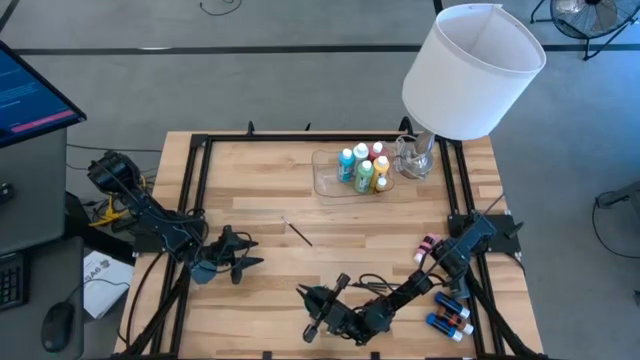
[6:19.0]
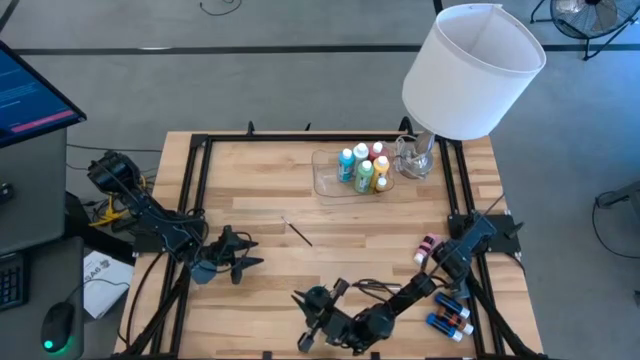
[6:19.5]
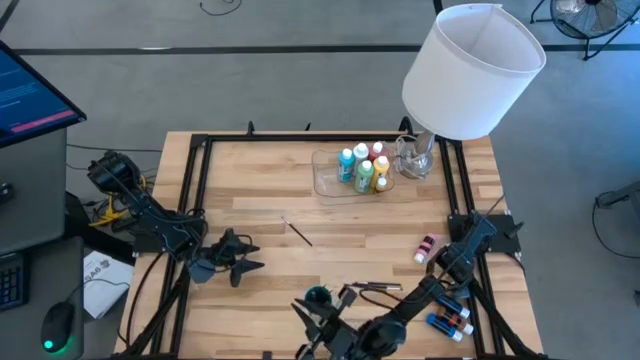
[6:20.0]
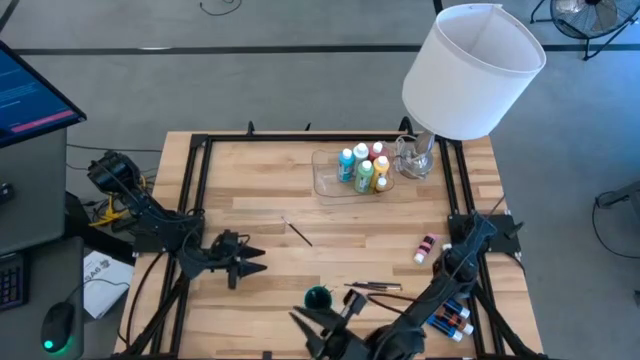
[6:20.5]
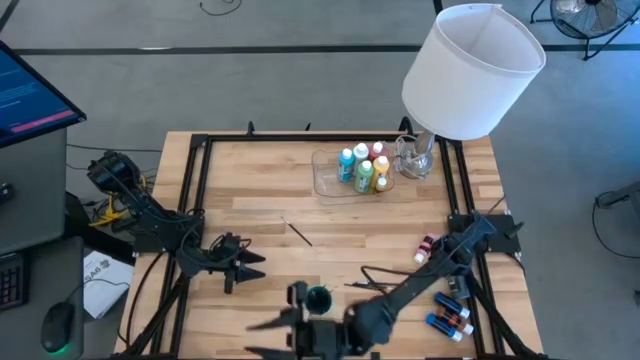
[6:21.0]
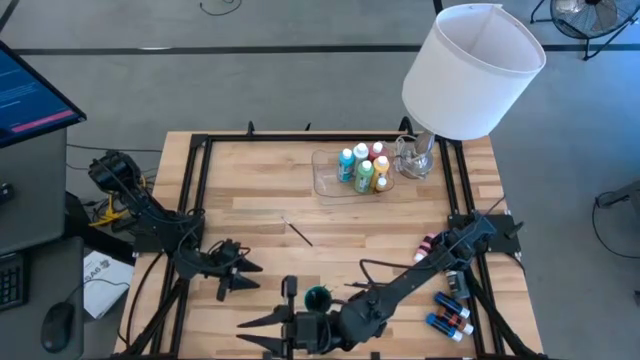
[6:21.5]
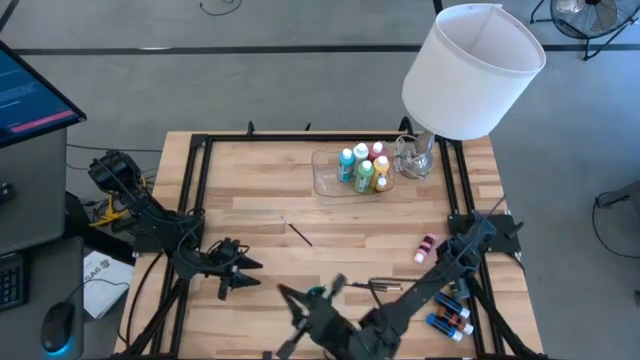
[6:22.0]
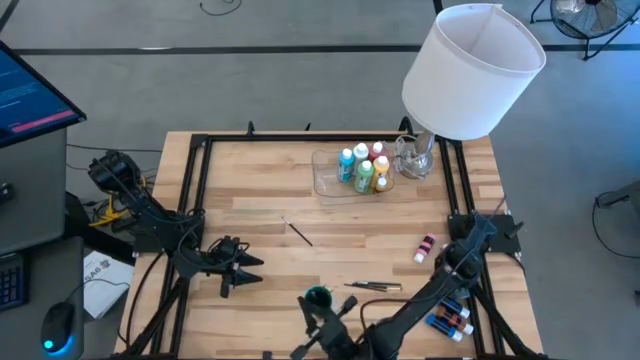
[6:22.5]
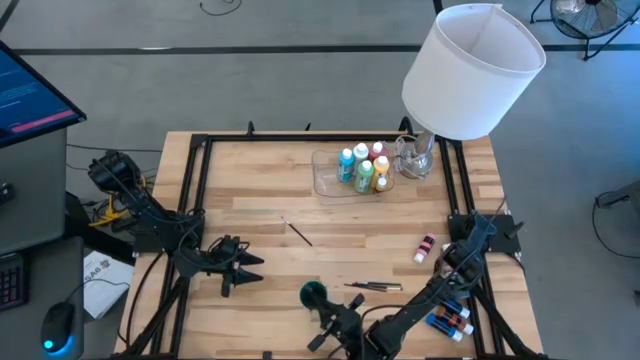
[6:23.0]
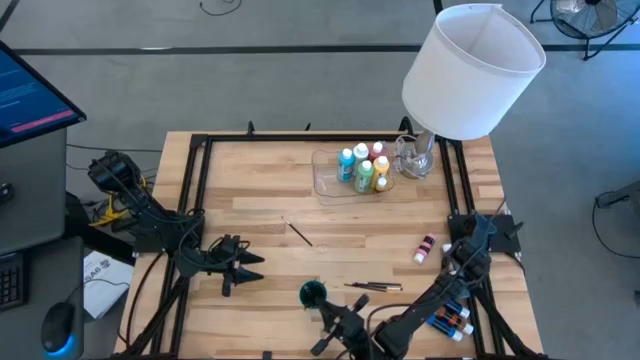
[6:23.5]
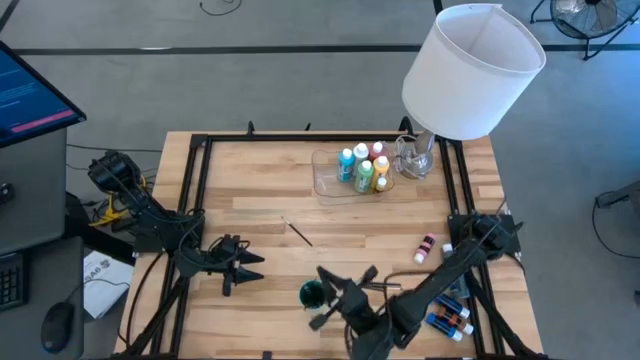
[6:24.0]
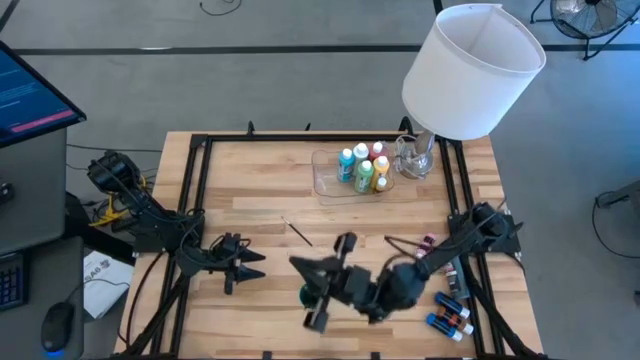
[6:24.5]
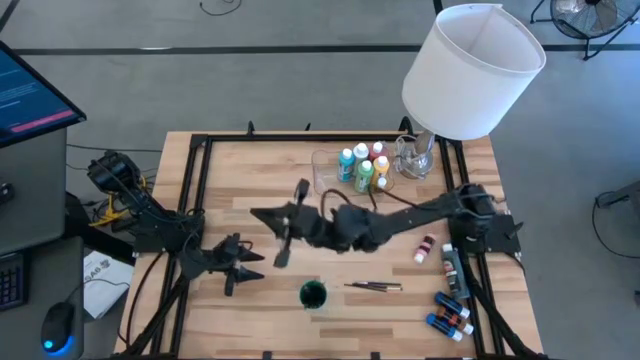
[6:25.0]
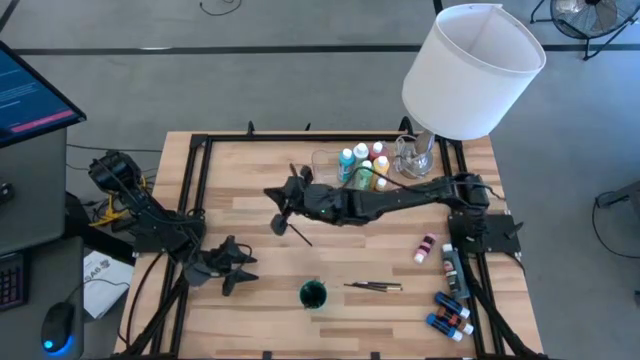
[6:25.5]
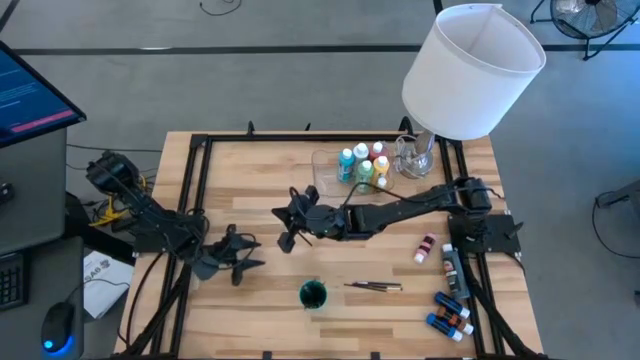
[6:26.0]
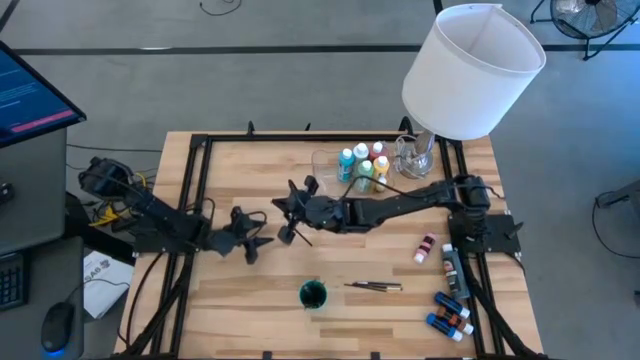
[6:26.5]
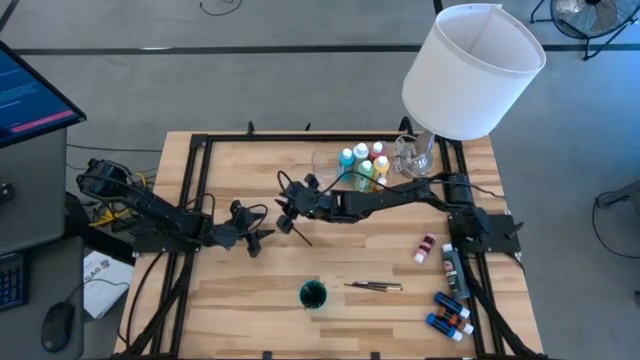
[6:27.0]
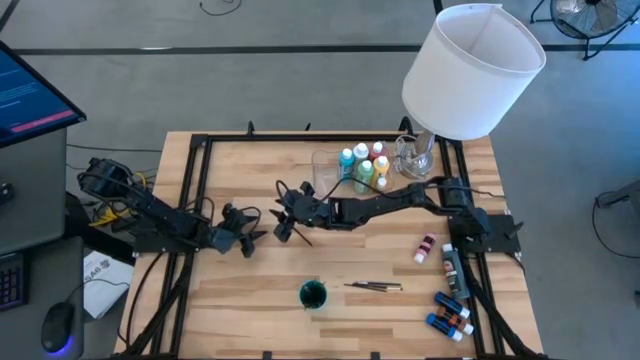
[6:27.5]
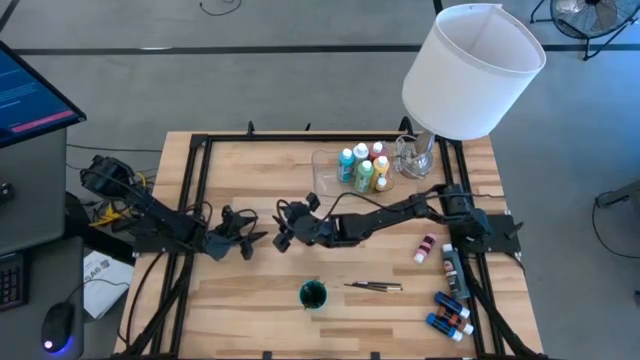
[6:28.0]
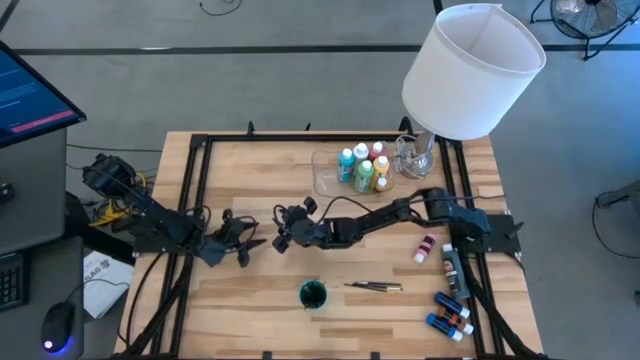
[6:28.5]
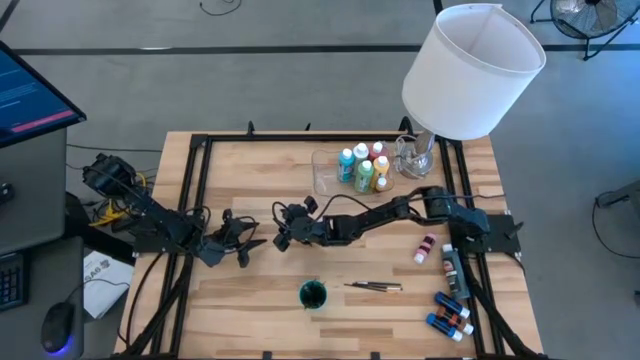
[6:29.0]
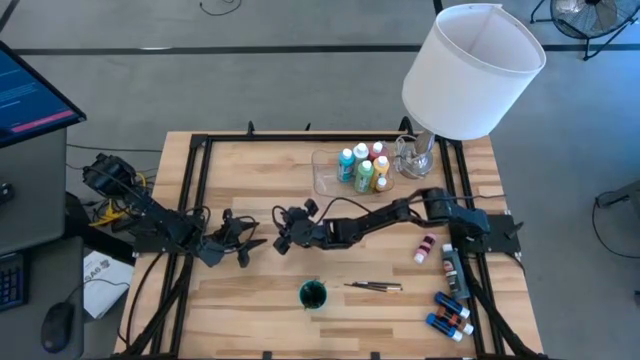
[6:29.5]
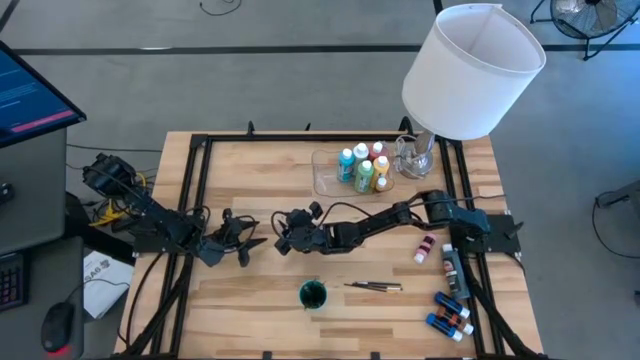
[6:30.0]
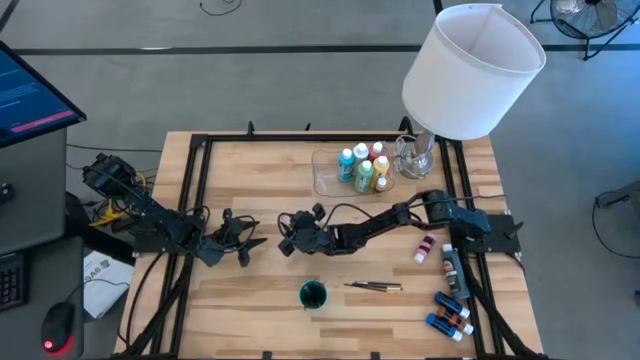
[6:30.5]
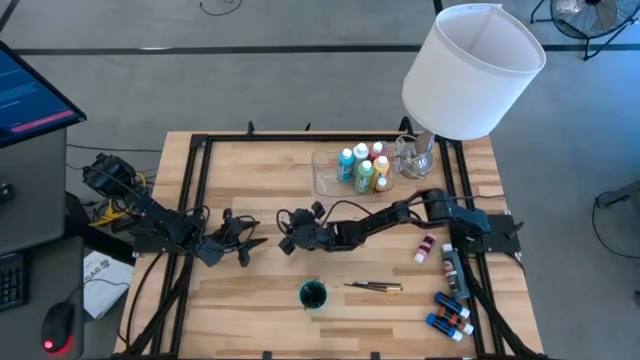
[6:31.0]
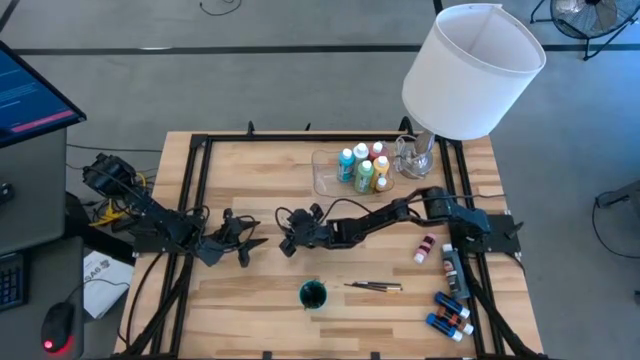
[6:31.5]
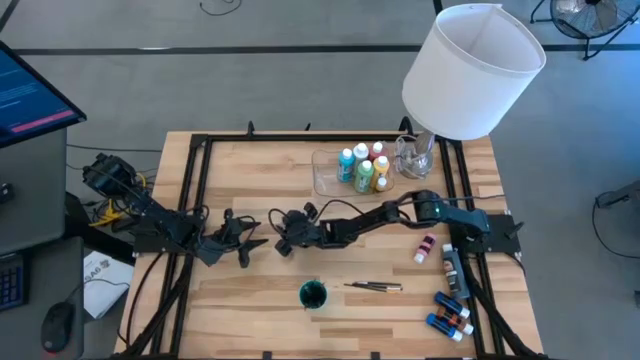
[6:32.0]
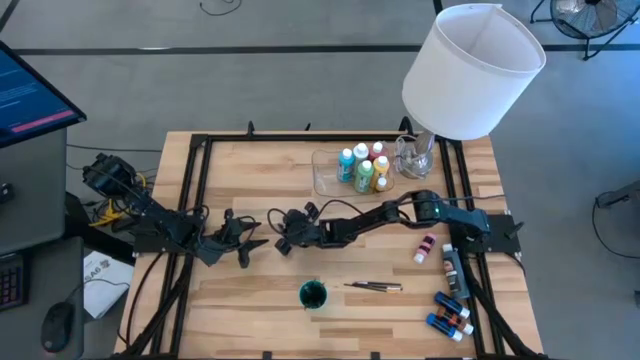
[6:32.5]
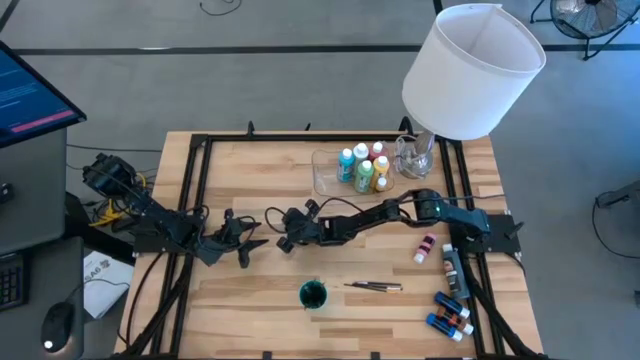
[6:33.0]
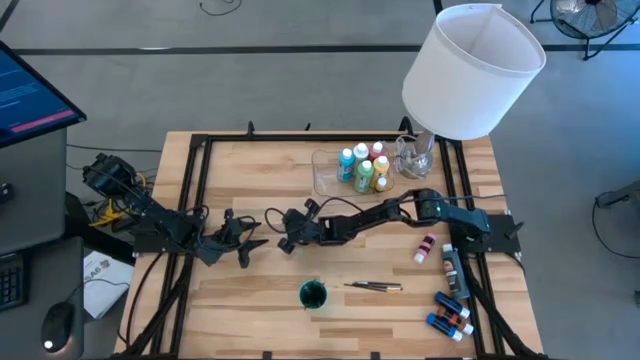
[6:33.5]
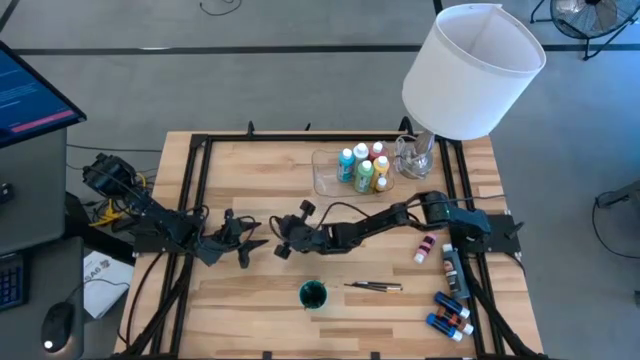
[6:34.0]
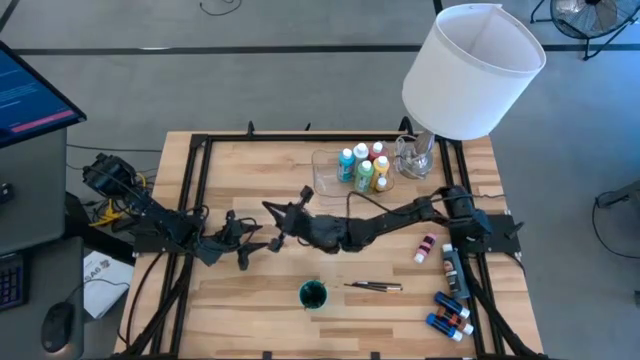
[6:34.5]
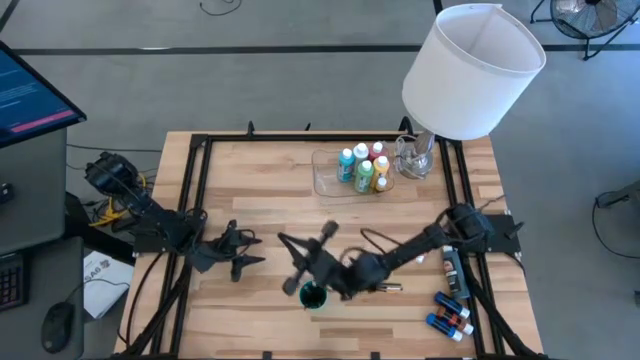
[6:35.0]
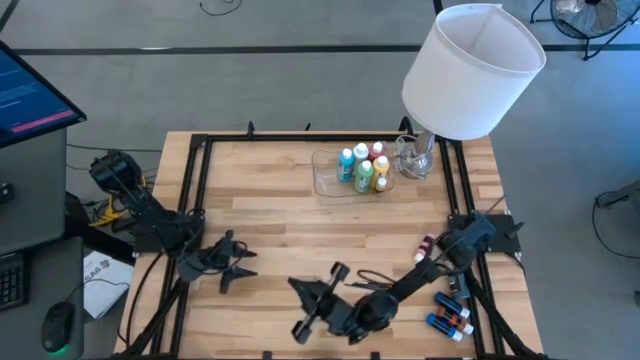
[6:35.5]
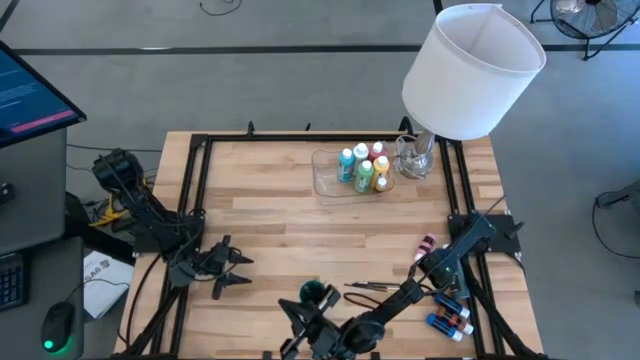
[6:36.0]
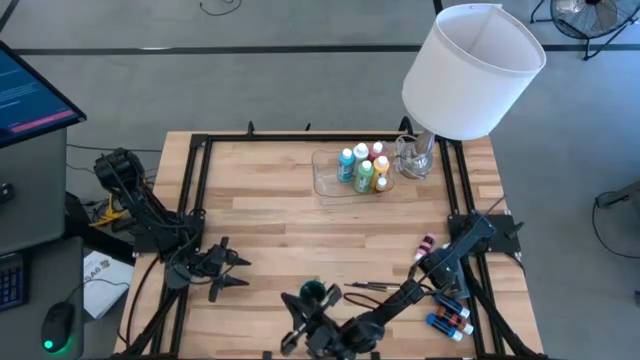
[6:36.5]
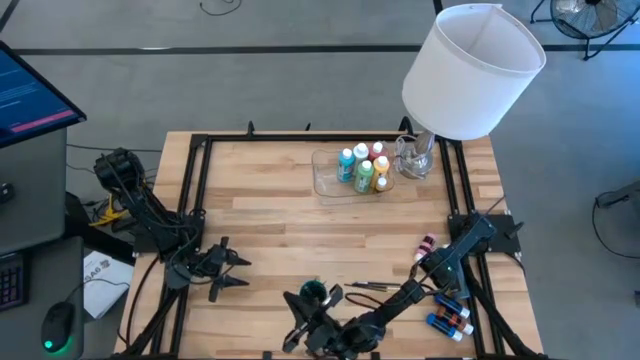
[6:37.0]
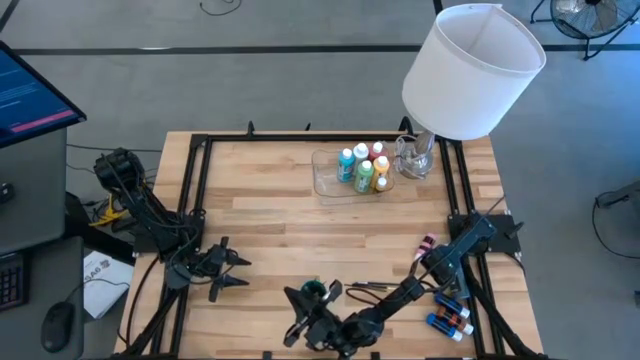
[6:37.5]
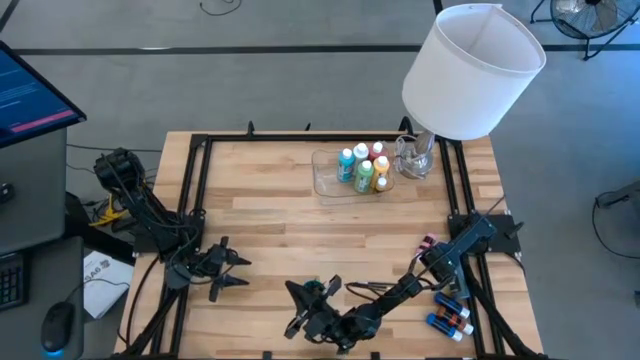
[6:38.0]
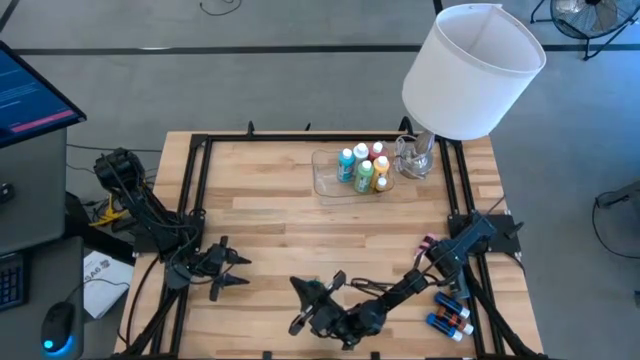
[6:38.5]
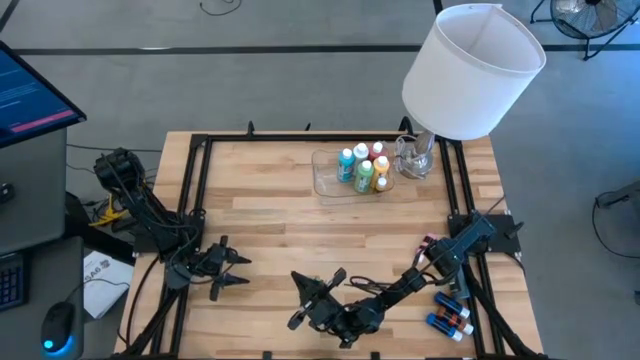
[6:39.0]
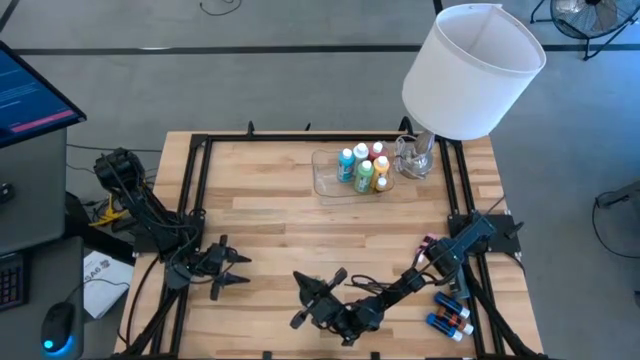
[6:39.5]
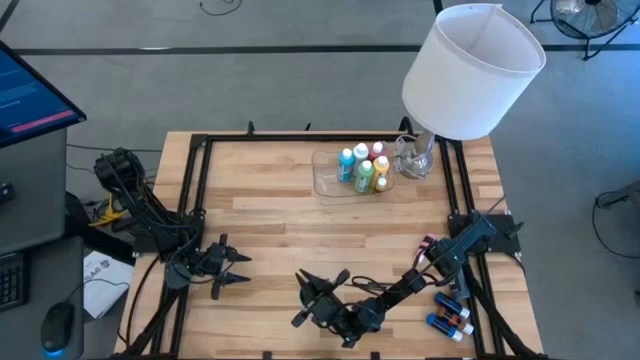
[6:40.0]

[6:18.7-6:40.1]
Task: Pick & Place Paint Supplies
Put the silver paintbrush into the green cup
